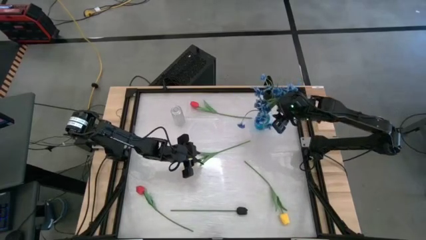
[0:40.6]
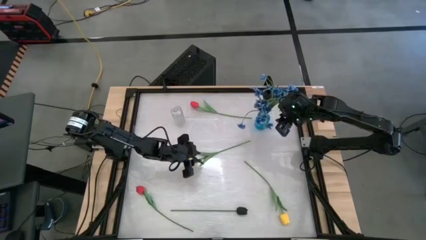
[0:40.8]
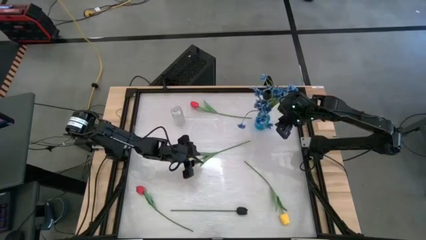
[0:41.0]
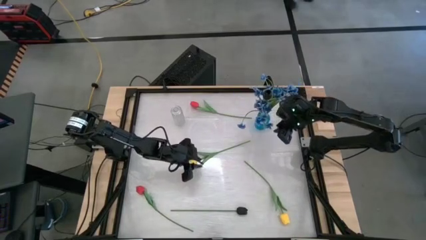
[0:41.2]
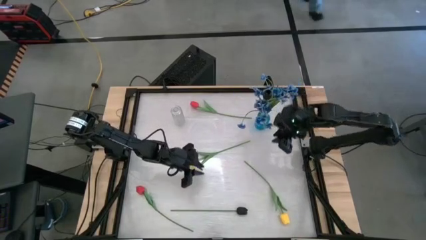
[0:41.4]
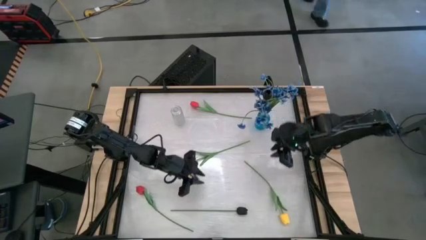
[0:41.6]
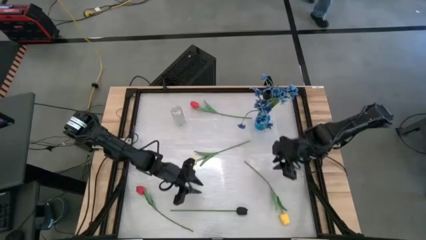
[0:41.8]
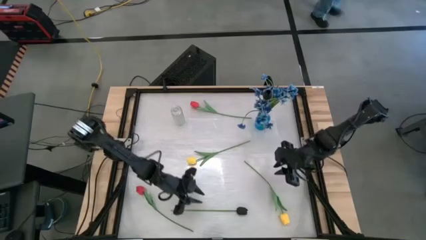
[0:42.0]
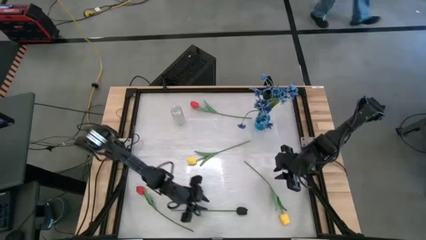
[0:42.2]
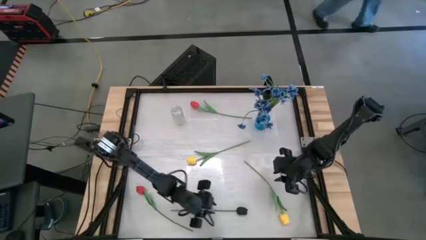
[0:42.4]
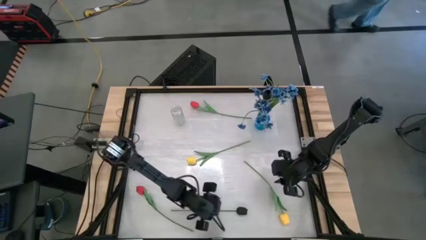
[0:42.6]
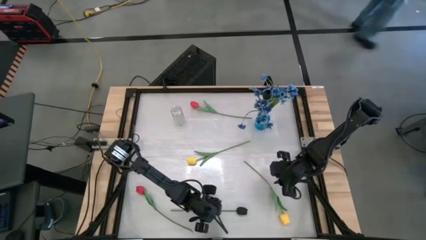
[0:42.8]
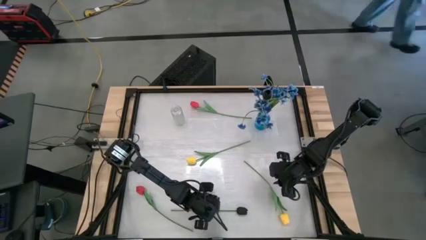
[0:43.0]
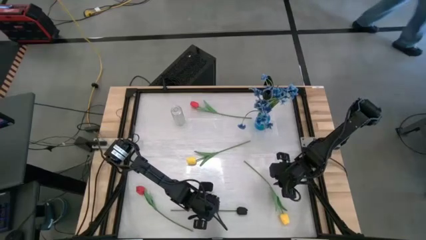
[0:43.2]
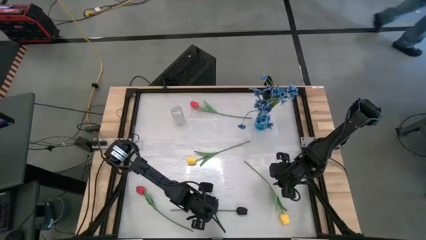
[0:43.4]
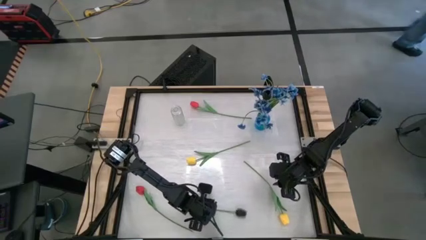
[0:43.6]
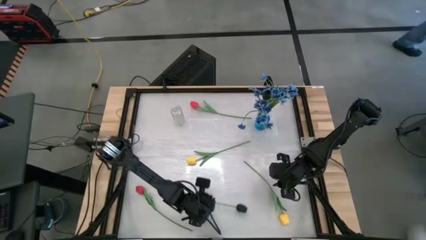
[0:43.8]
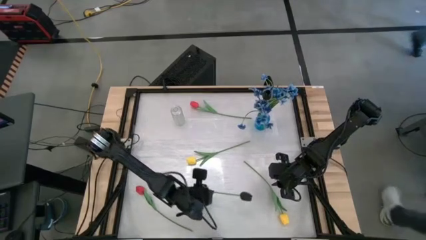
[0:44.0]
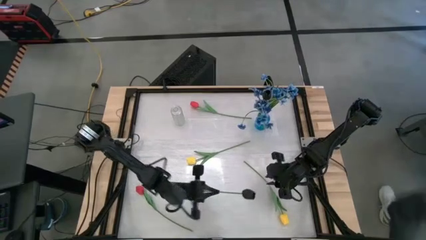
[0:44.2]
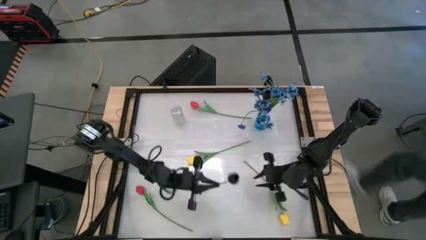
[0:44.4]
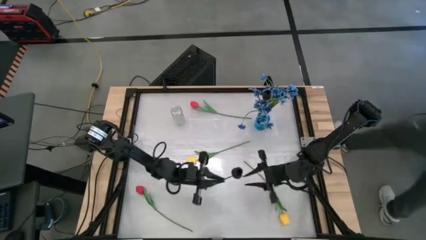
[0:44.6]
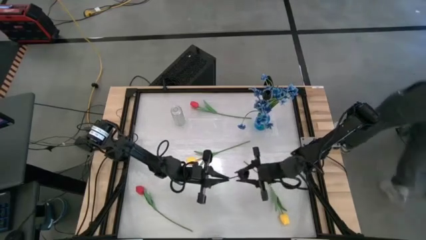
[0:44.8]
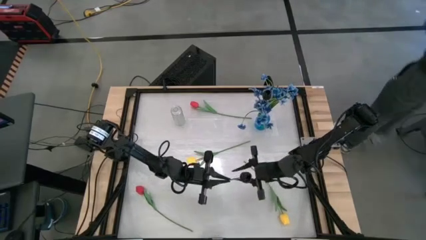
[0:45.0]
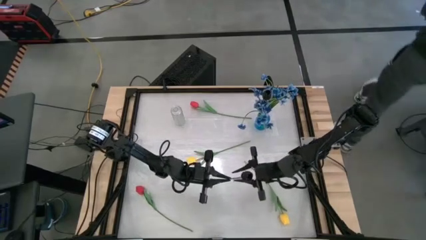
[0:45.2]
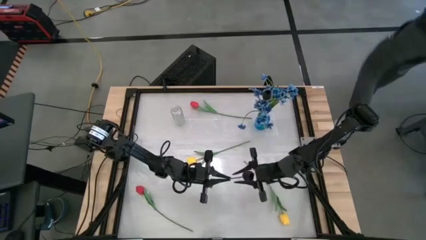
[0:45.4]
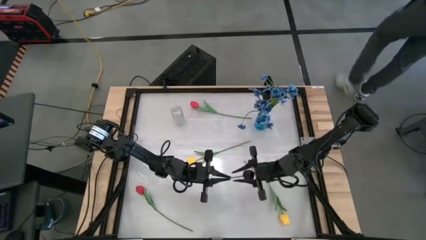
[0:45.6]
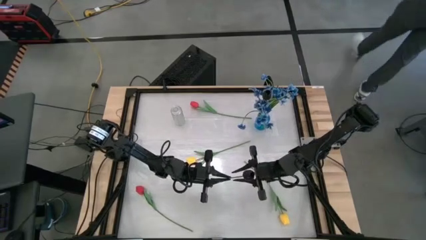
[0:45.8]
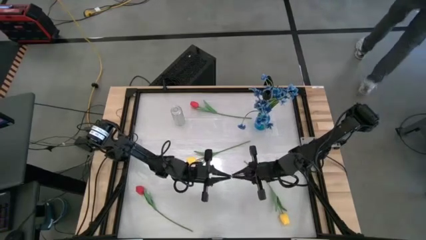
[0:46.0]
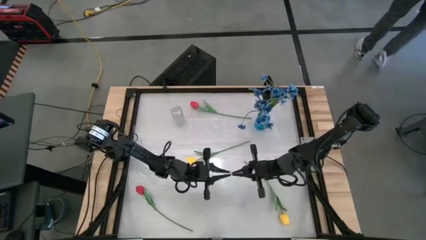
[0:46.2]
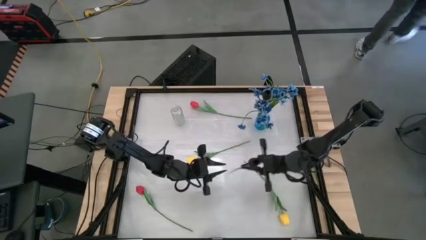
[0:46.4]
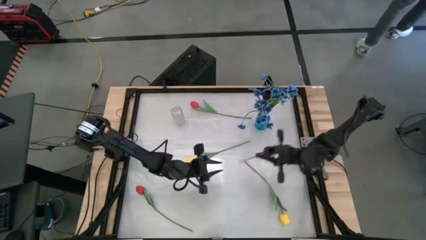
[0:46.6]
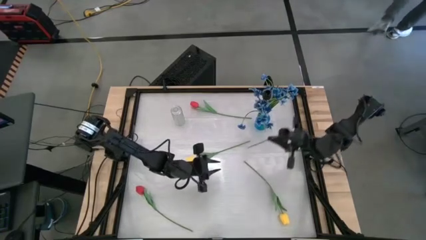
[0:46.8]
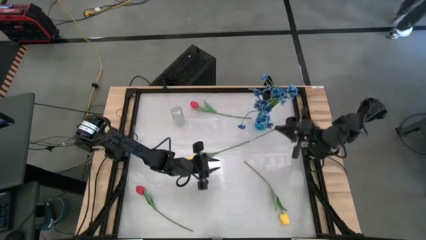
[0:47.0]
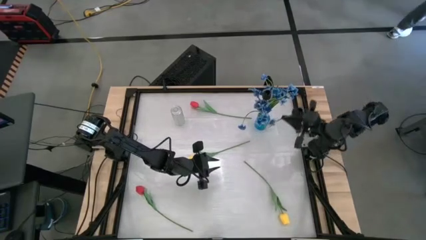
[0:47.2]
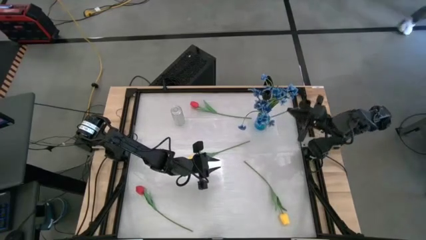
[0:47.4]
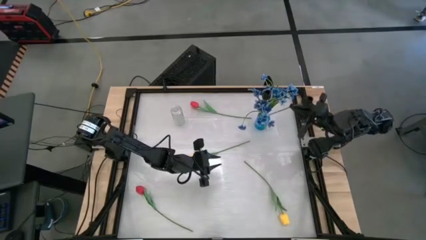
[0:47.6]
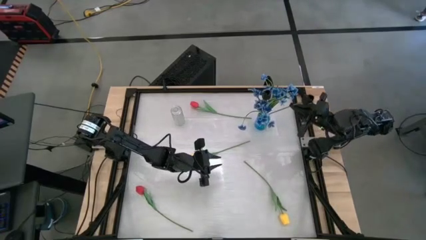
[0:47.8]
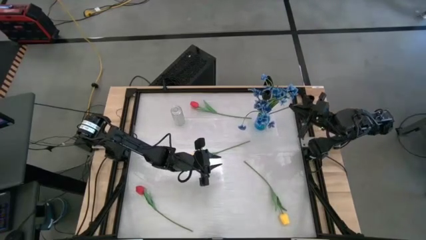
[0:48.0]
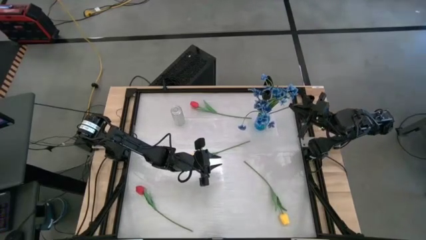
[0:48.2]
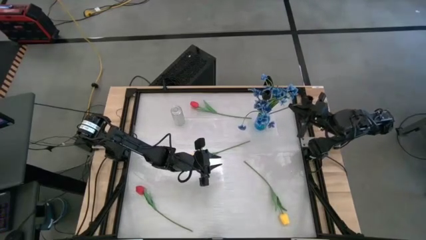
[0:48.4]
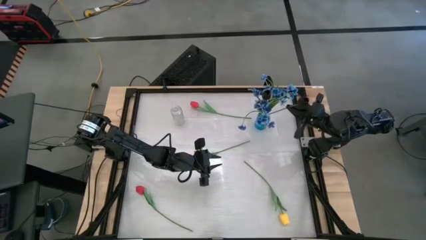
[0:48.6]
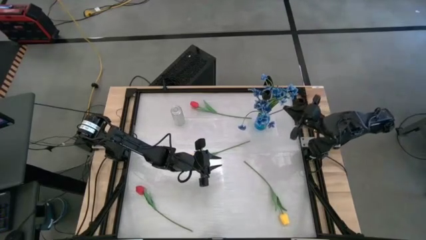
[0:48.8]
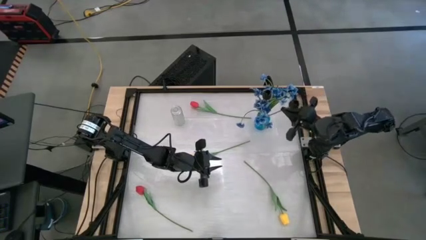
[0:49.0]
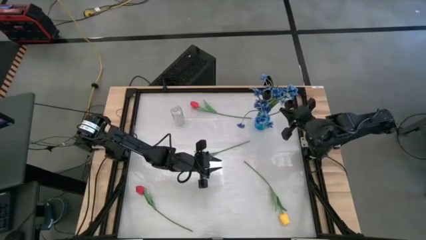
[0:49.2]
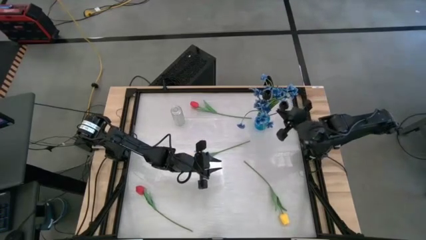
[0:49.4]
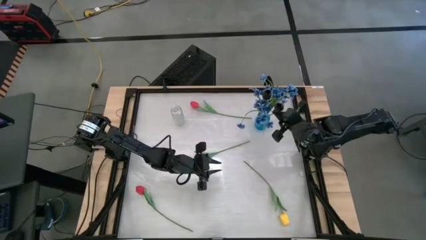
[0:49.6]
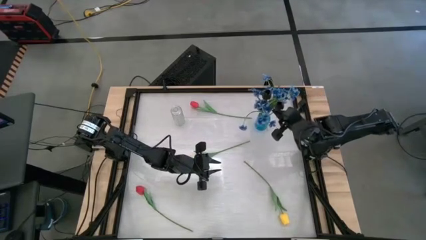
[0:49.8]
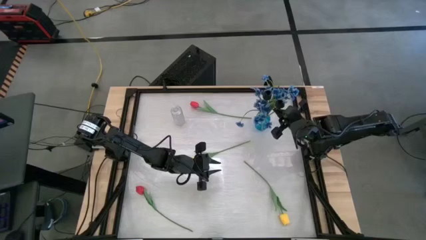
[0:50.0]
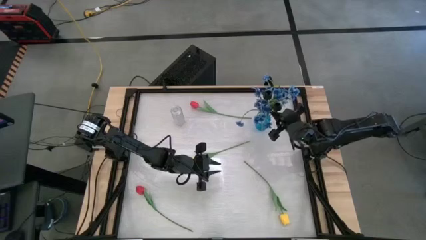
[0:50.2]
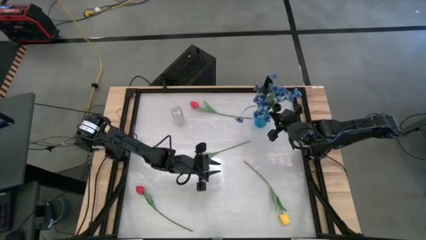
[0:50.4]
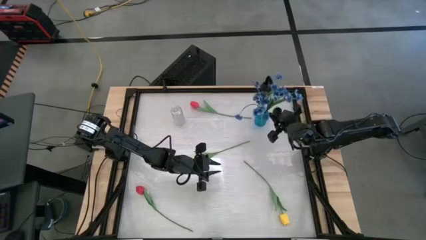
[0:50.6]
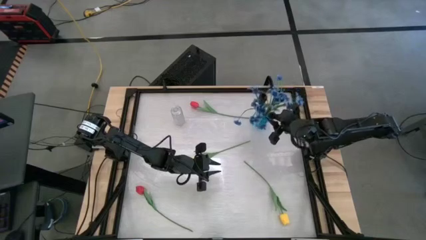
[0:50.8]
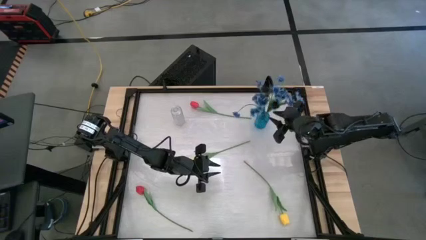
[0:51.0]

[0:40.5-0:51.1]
Task: Sort flowers into vase by color
Put the black flower to the blue vase

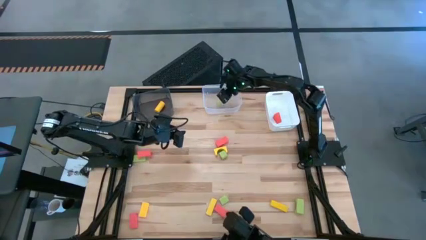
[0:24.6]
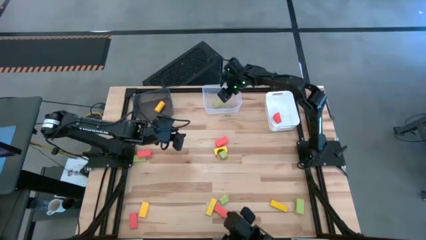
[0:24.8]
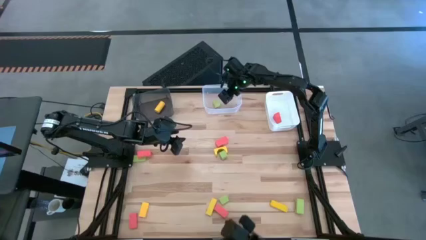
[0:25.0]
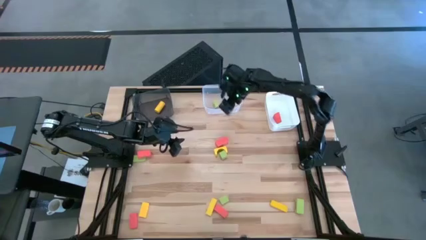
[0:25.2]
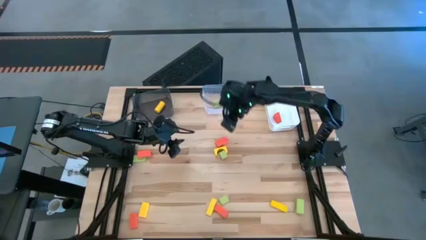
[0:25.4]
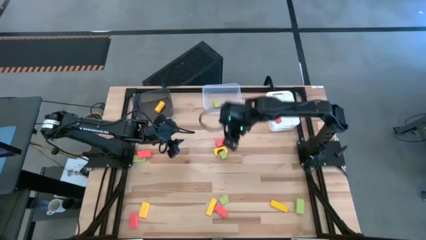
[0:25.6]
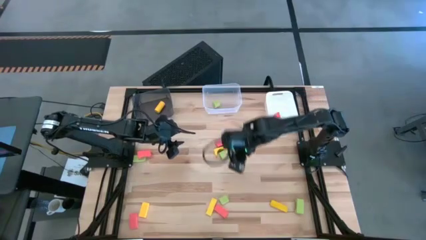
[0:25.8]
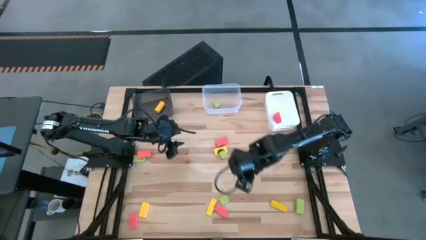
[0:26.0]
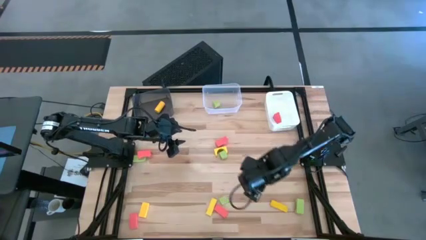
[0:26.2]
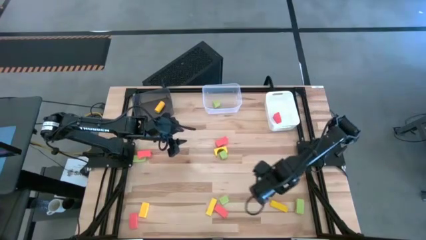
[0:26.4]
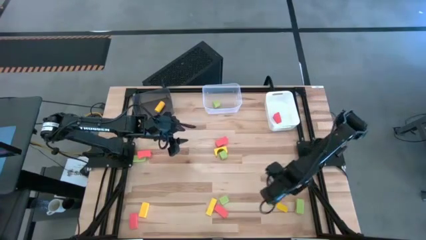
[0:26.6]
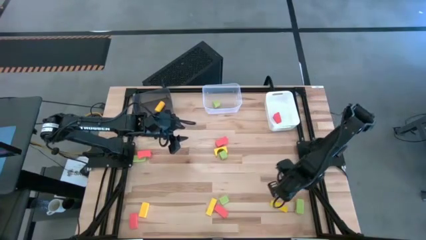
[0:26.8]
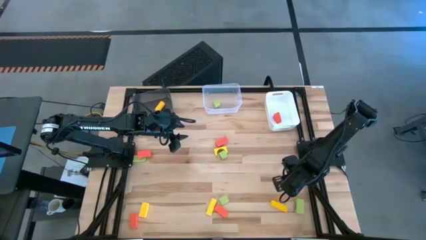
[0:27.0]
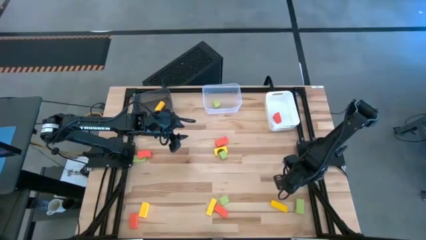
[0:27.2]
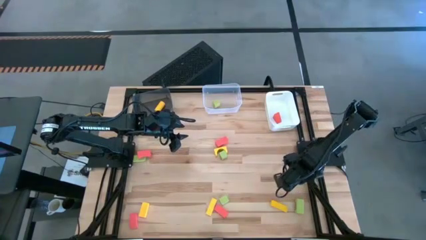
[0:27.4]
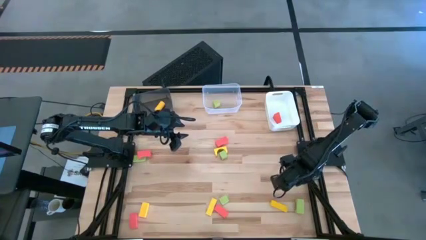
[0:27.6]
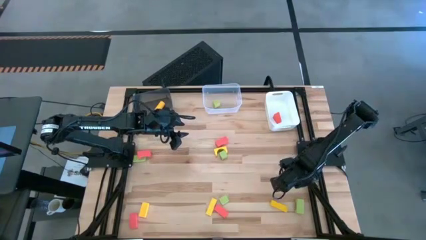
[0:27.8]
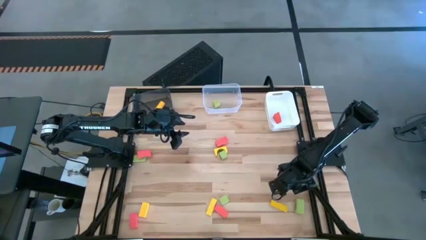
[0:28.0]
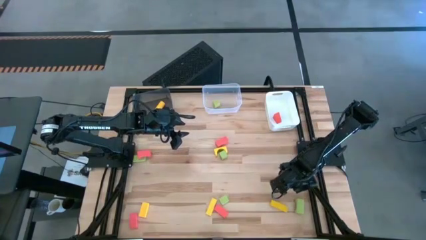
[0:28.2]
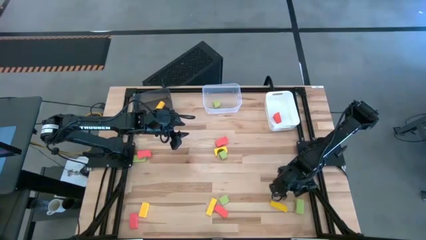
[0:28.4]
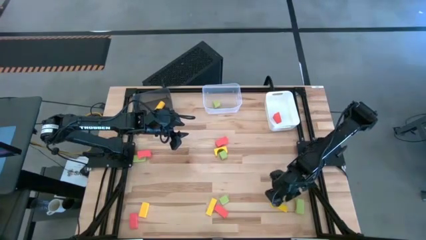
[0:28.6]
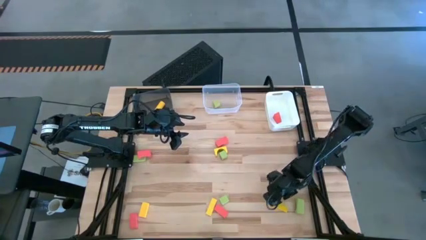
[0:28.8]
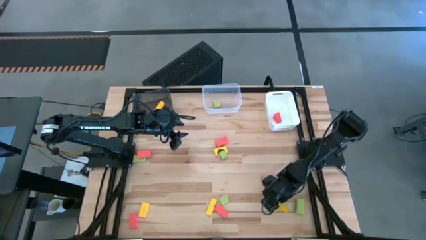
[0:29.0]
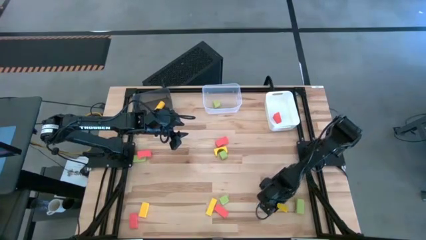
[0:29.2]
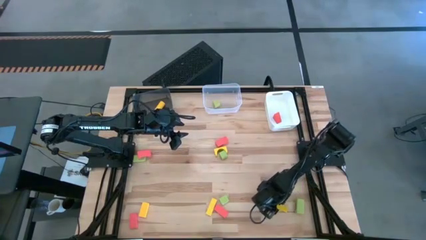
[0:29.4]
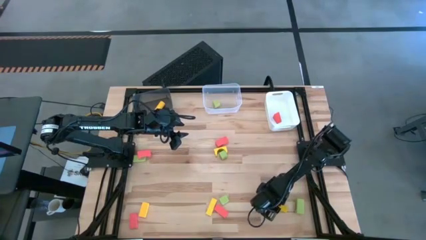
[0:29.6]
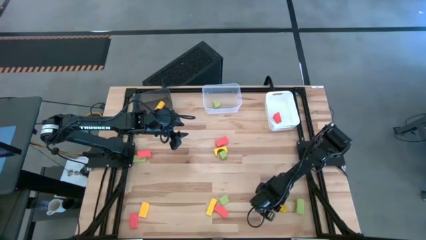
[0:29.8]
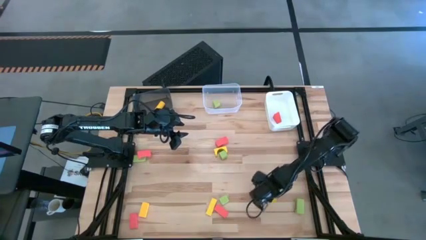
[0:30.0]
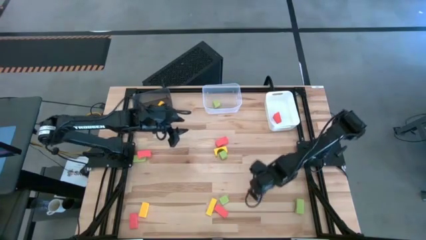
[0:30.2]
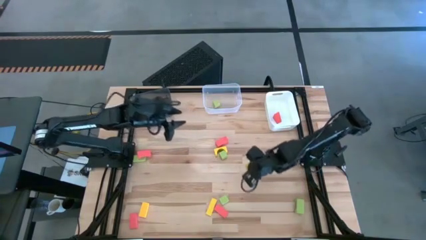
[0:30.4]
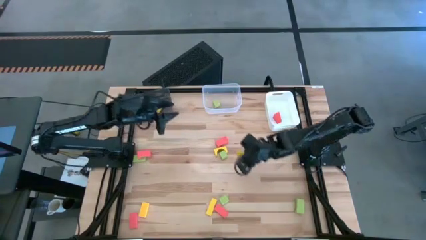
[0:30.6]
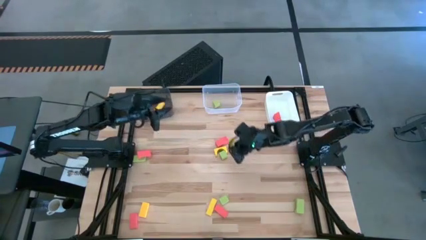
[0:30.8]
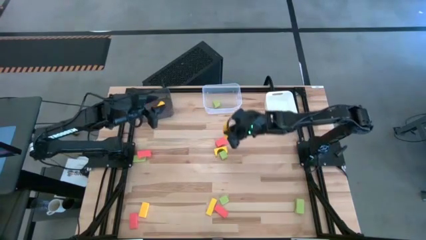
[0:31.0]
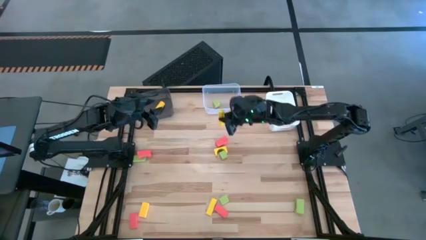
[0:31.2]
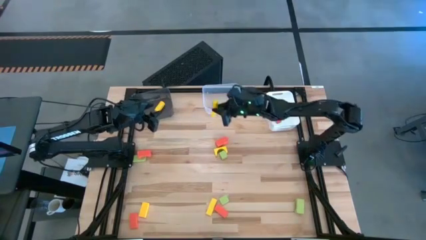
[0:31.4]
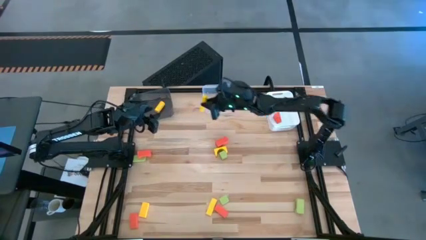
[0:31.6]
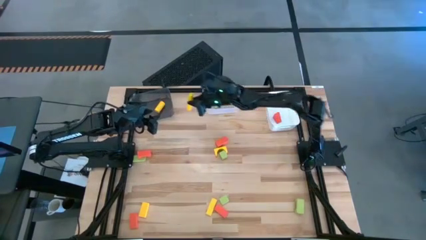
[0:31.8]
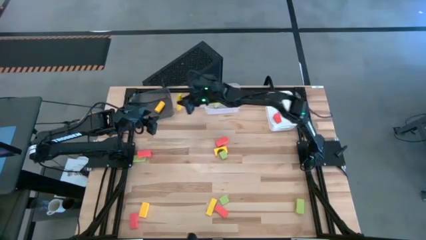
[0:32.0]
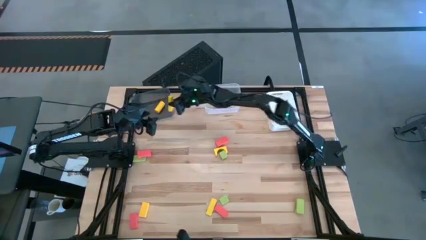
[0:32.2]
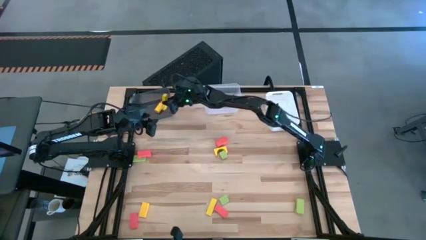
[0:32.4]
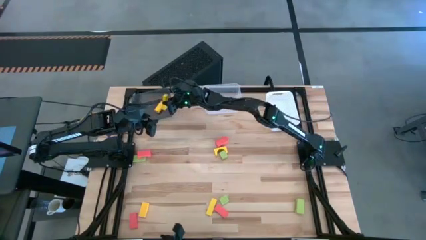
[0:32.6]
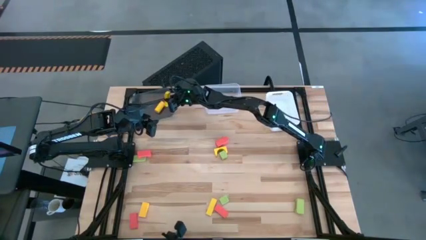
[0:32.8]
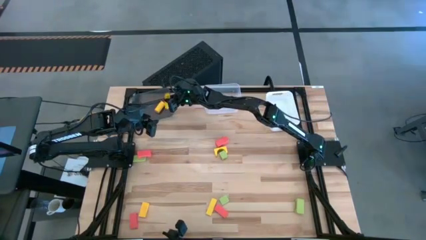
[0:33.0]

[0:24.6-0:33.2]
Task: Sort & place blocks by color
Put the yellow block into the black bin
